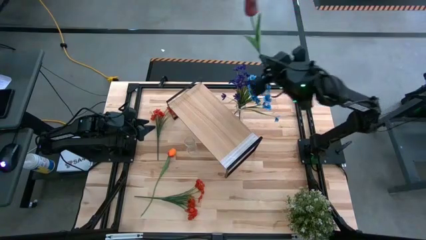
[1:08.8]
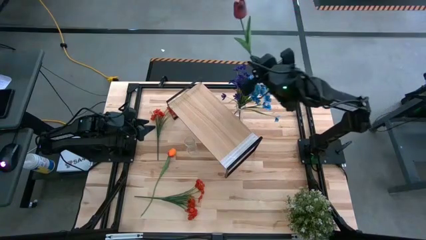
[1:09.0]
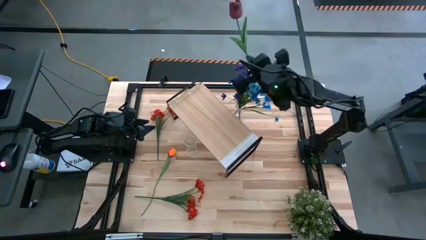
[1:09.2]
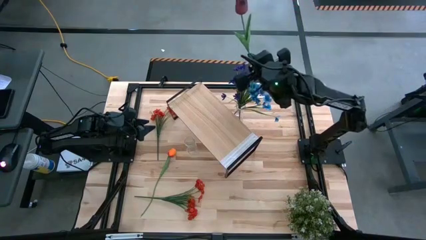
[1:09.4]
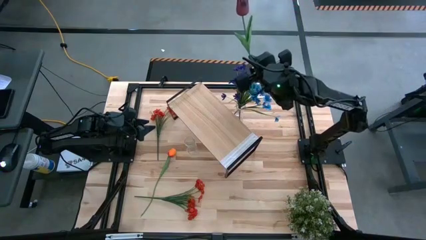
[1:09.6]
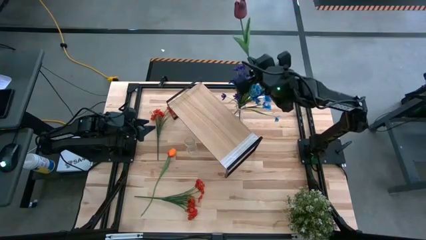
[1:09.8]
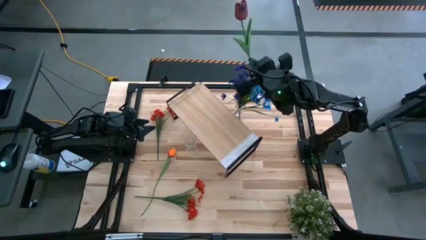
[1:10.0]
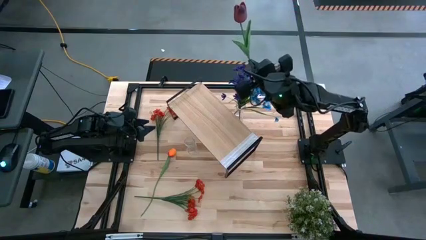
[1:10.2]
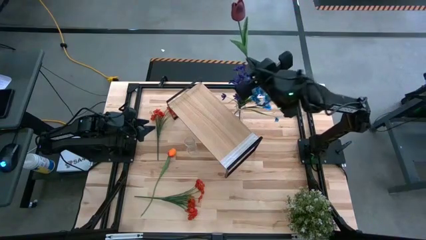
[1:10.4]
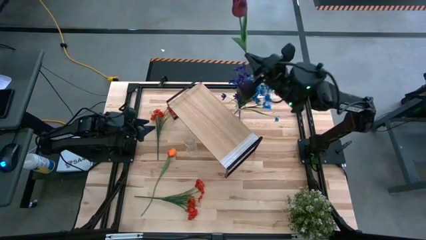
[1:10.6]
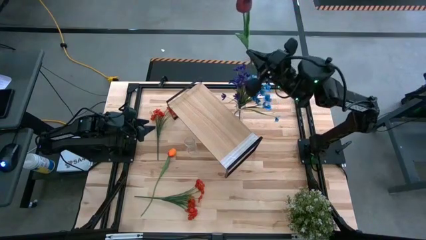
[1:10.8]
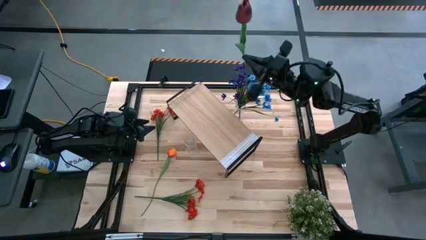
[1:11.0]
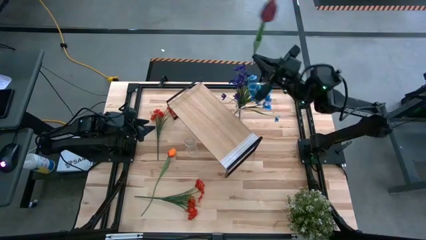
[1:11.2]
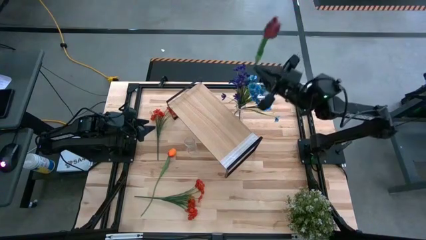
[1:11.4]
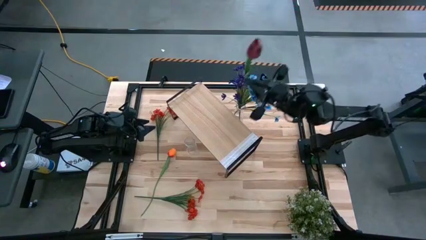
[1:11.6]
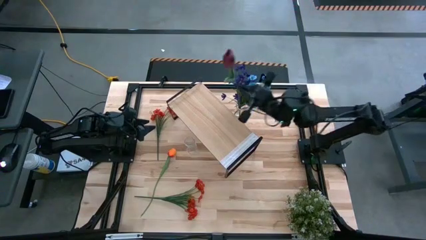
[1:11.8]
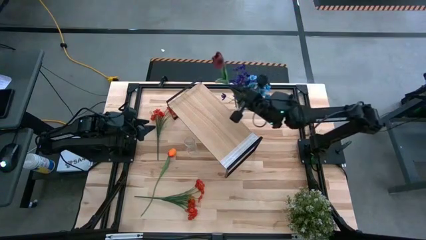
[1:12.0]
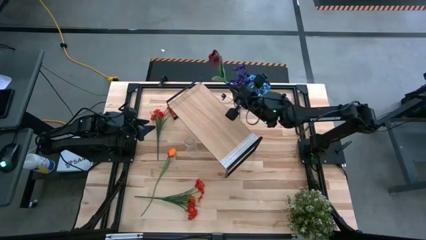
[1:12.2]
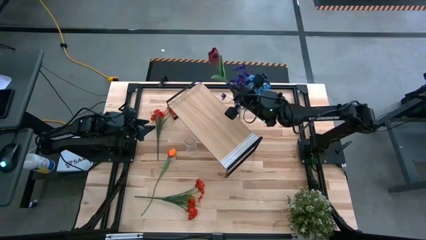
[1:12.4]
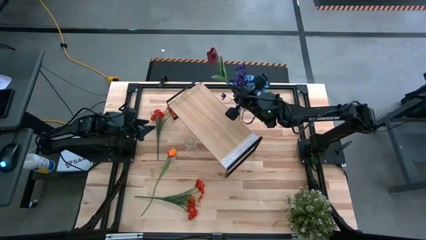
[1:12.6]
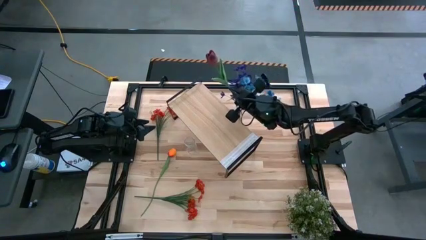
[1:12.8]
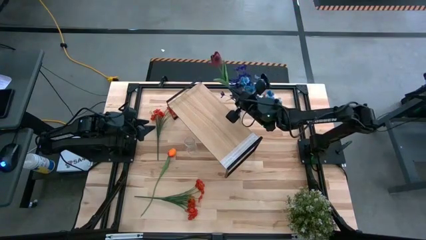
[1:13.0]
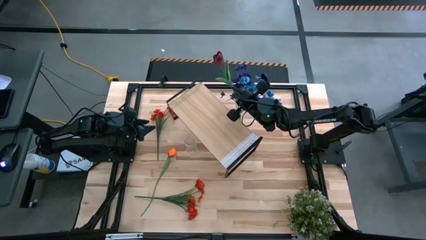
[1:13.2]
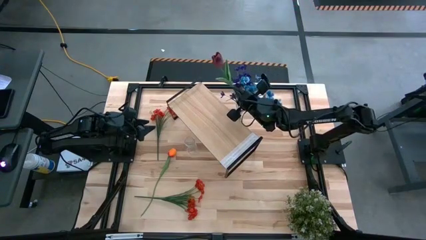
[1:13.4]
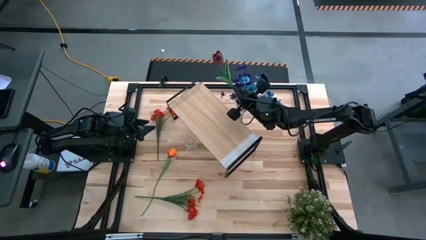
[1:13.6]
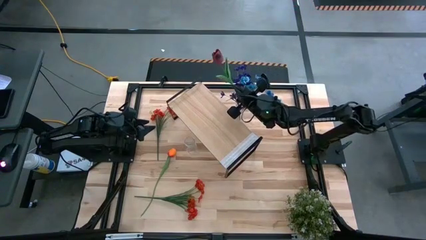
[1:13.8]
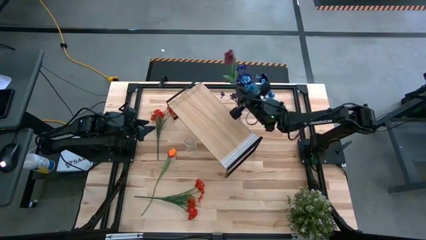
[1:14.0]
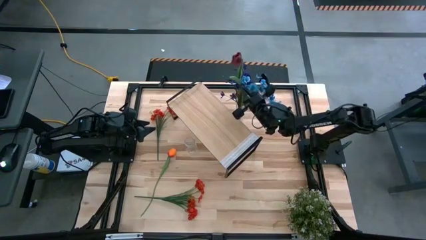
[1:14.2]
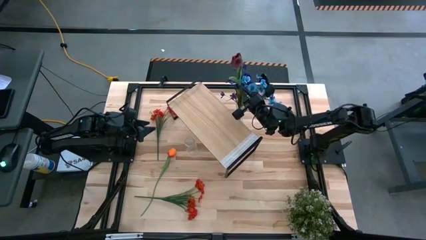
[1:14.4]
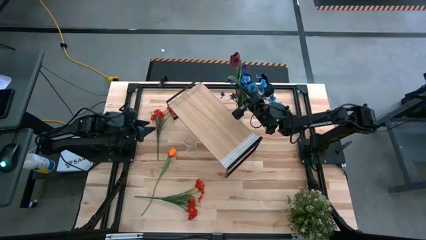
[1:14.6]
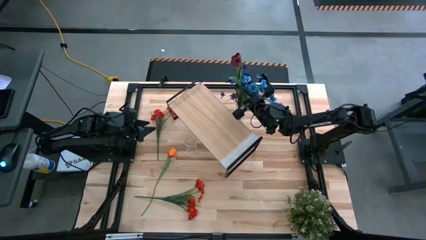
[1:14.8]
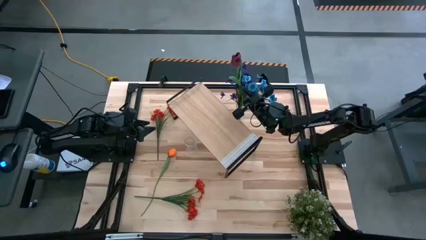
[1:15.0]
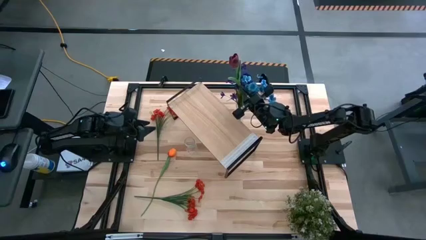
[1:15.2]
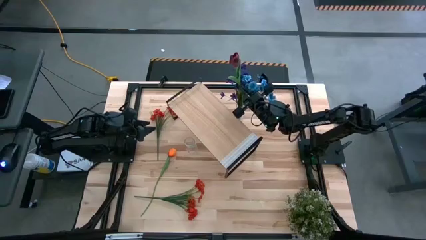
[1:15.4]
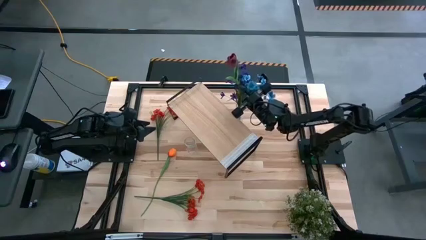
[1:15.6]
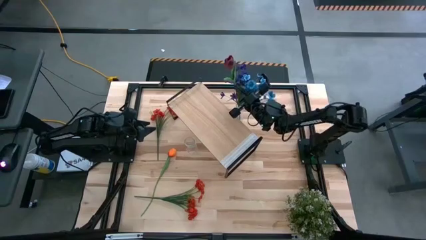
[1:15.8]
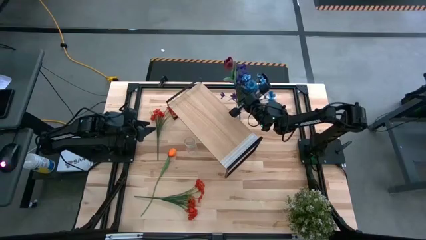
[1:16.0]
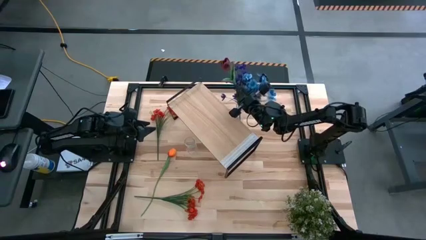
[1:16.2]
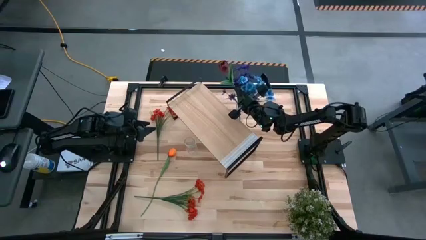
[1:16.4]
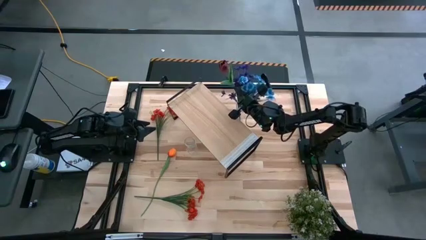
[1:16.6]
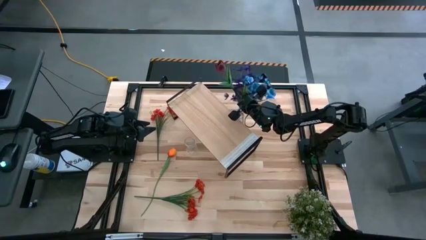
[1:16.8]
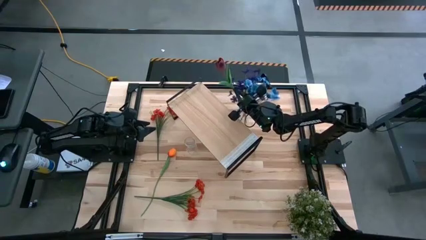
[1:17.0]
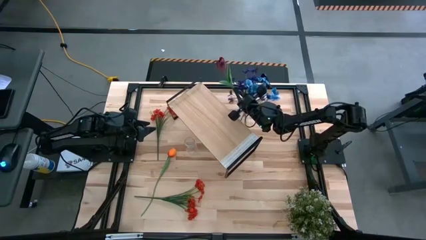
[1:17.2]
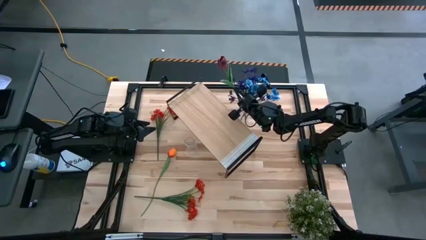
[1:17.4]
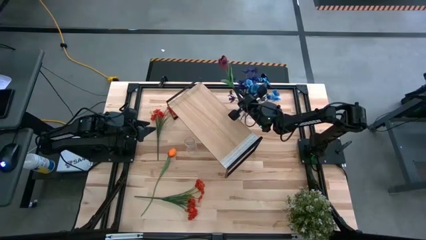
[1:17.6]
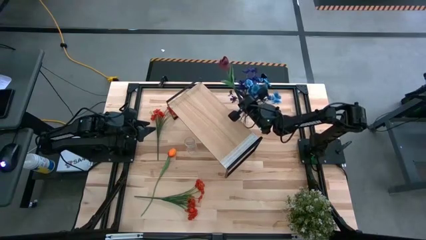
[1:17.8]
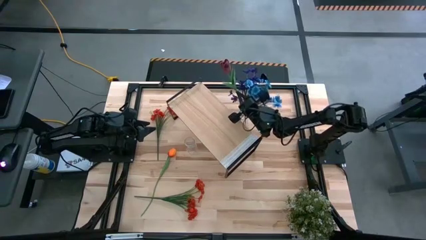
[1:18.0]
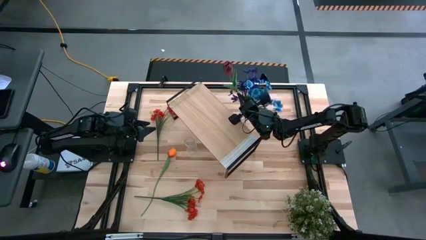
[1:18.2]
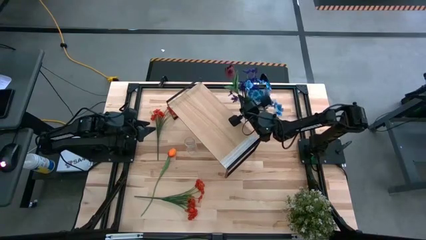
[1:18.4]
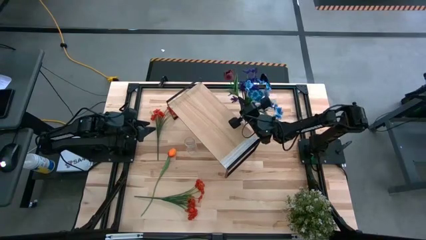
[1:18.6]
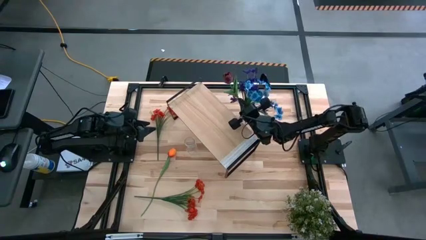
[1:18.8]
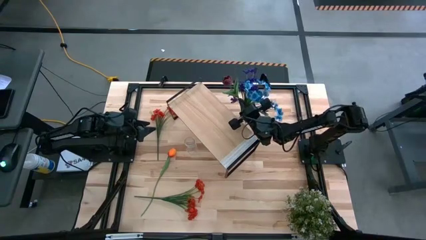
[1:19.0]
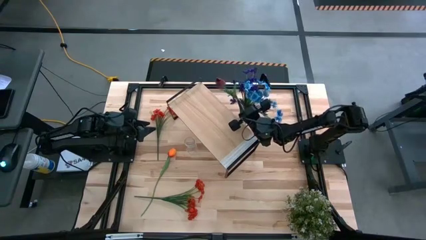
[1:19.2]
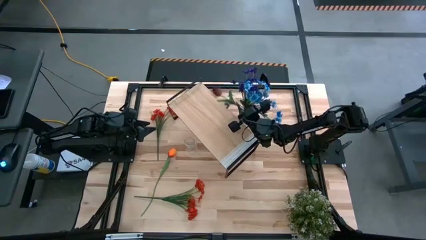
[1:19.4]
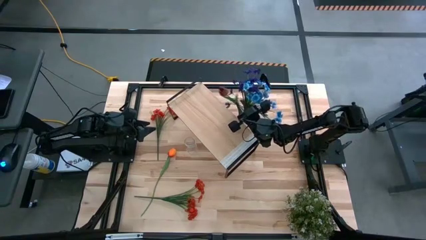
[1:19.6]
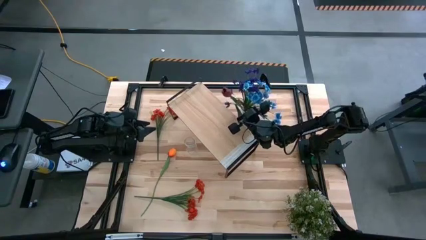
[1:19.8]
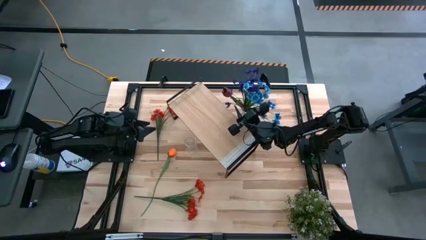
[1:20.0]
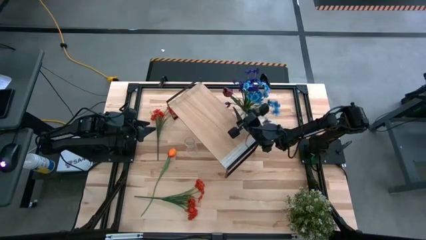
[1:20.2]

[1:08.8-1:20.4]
Task: Pick and place flowers into a vace then onto a shelf
Put the red flower into the top transparent vase
